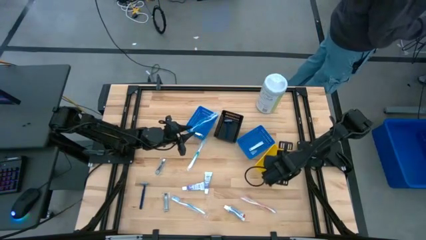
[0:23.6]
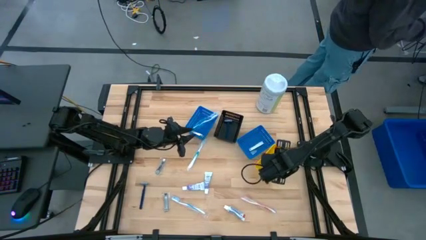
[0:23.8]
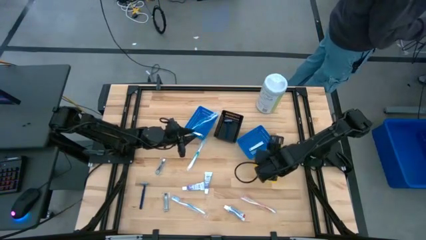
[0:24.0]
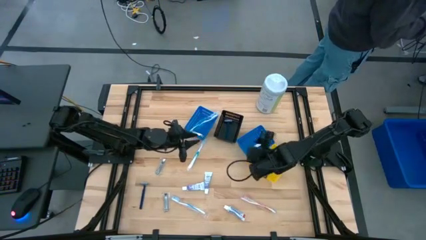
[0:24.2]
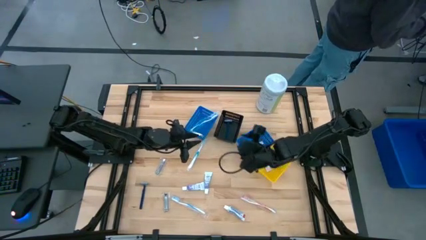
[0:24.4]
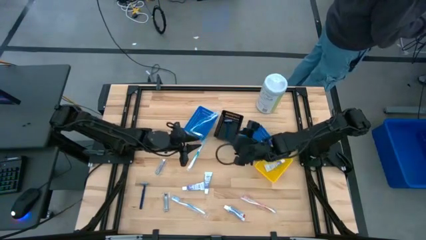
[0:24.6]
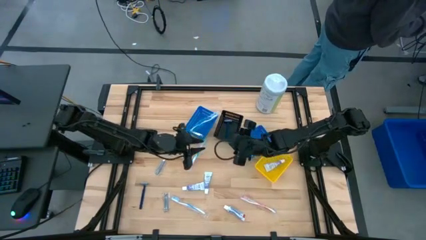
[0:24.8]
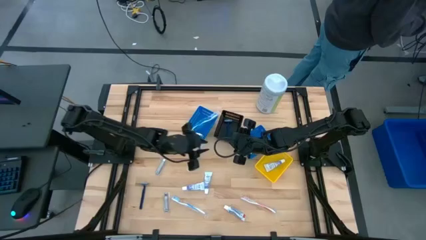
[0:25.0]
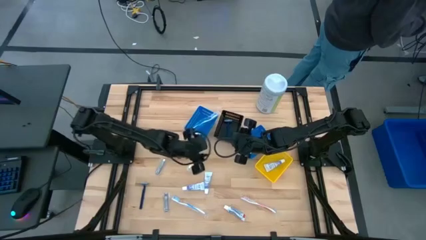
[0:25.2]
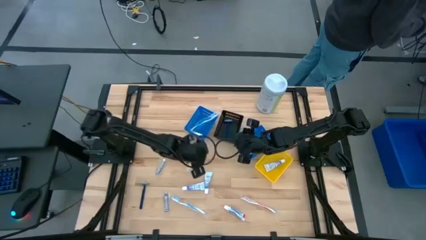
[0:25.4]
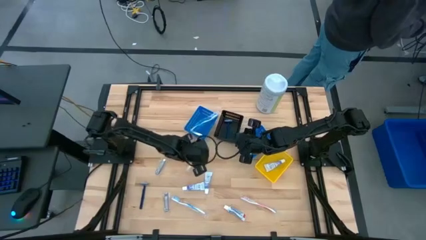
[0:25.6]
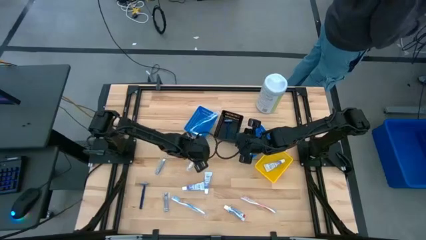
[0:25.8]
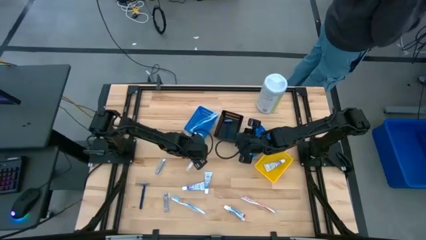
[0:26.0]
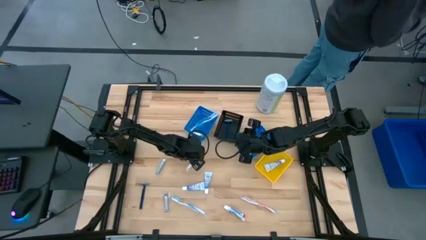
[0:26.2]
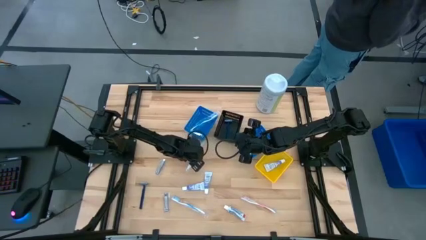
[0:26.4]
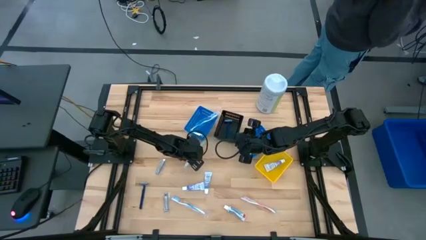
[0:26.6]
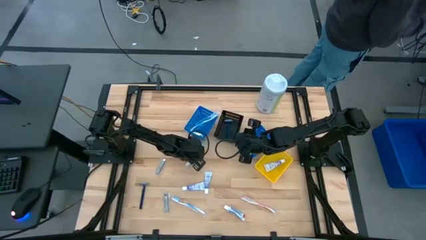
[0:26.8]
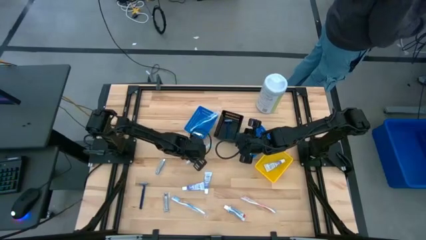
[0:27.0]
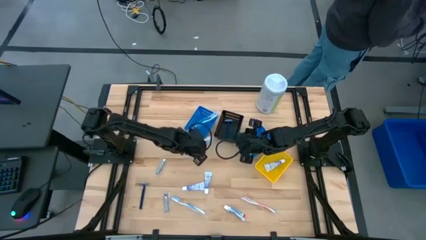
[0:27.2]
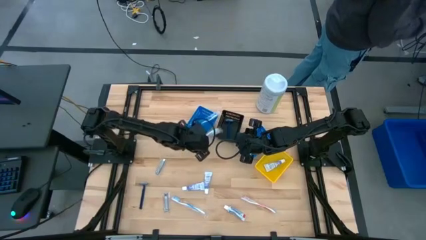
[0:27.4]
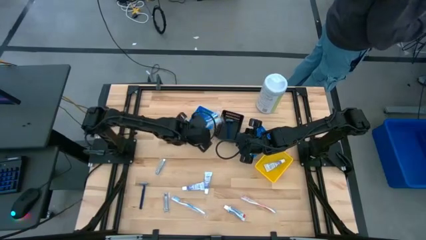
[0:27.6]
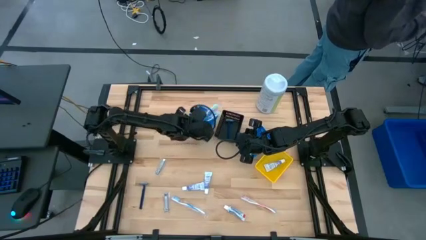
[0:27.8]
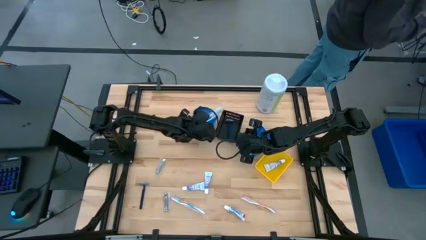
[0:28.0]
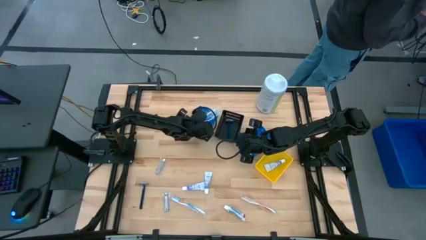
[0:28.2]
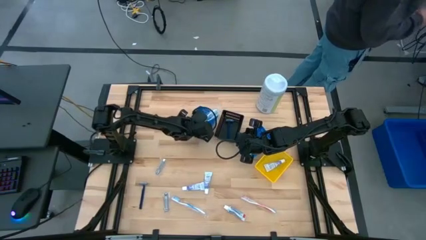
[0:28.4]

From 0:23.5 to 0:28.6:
Task: Pick & Place Travel size toiletries
Put the top blue toothbrush into the left blue basket

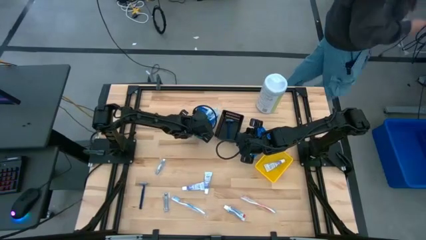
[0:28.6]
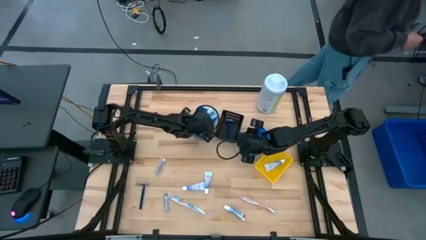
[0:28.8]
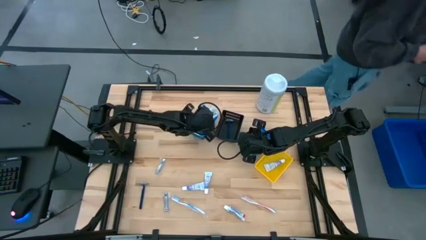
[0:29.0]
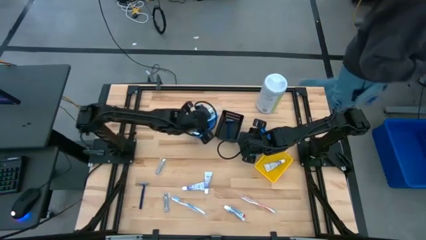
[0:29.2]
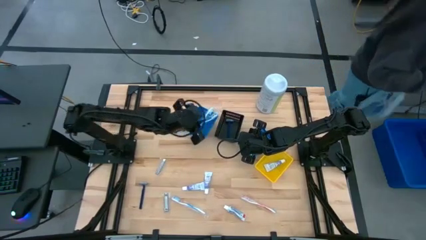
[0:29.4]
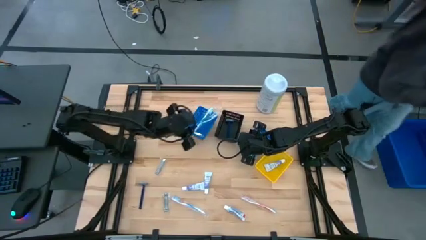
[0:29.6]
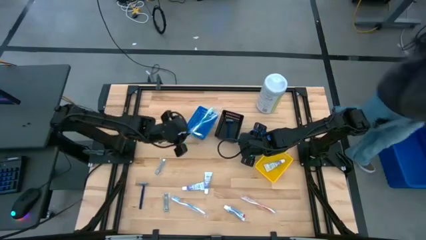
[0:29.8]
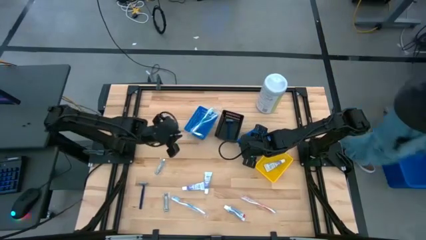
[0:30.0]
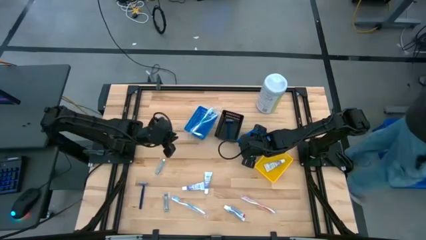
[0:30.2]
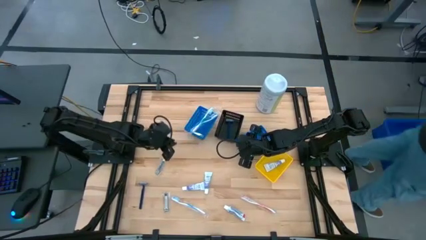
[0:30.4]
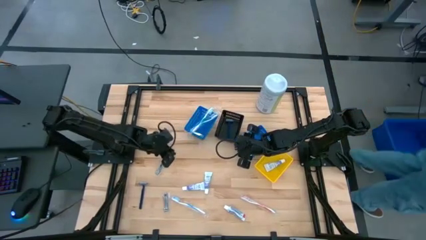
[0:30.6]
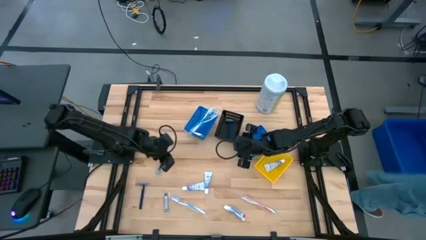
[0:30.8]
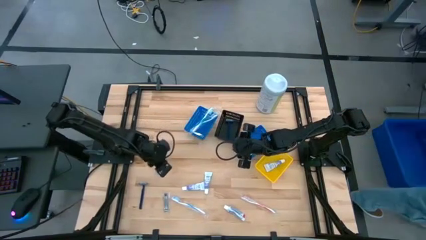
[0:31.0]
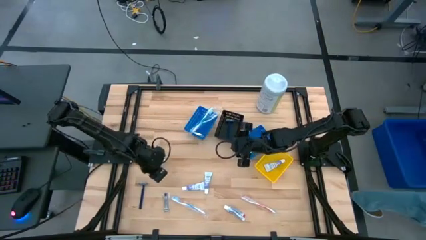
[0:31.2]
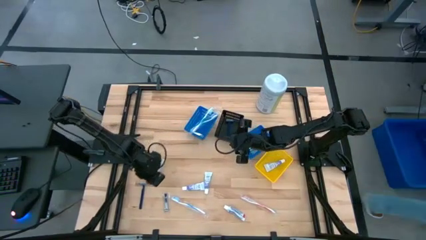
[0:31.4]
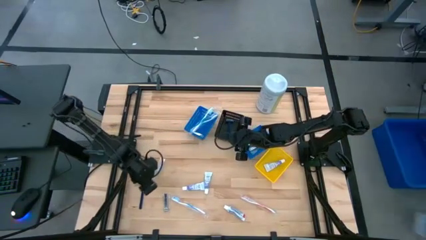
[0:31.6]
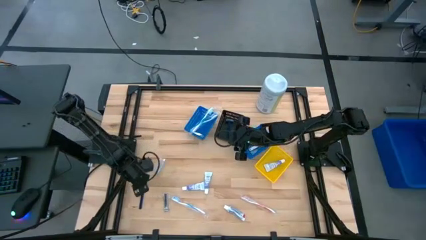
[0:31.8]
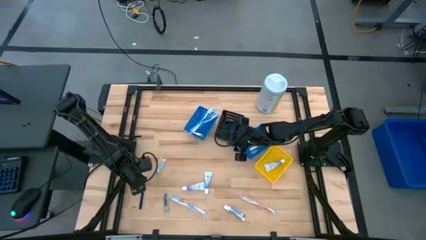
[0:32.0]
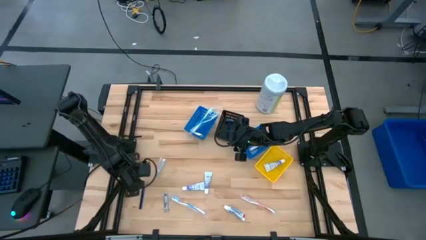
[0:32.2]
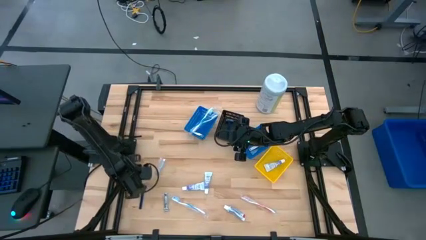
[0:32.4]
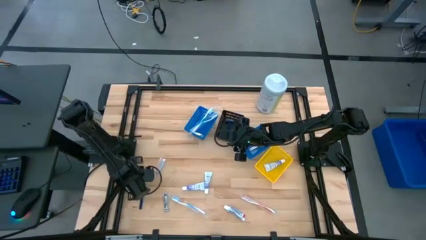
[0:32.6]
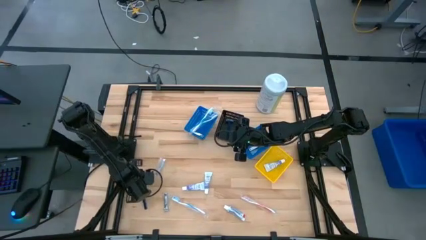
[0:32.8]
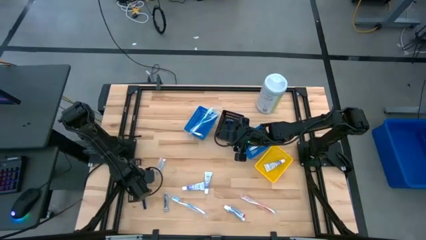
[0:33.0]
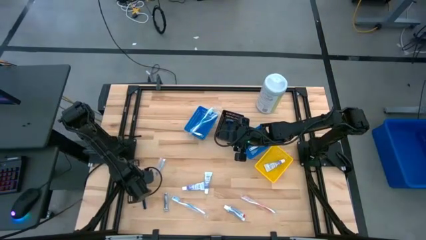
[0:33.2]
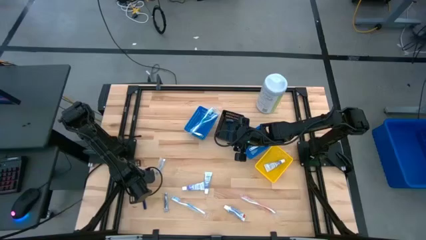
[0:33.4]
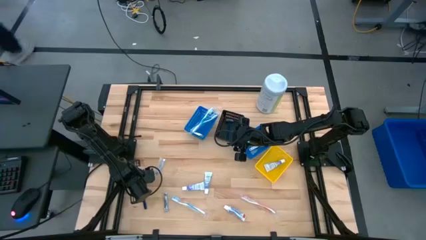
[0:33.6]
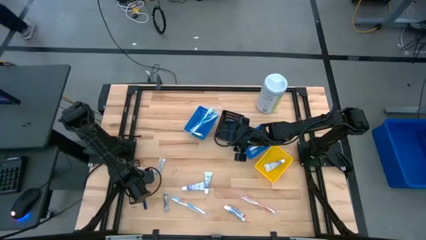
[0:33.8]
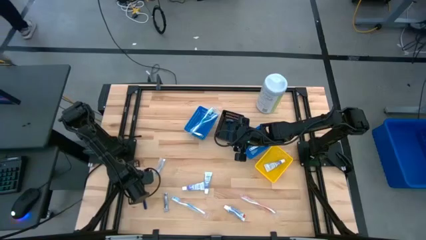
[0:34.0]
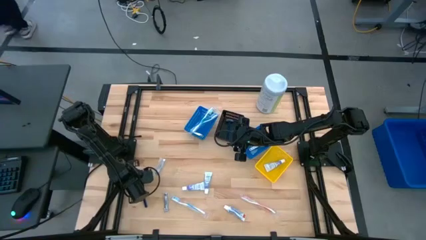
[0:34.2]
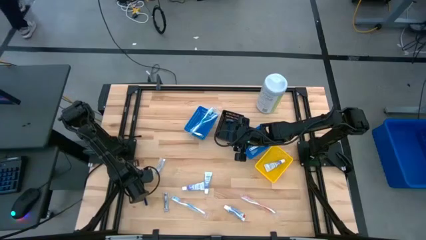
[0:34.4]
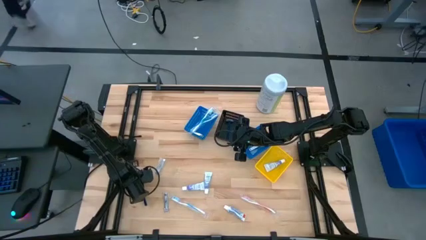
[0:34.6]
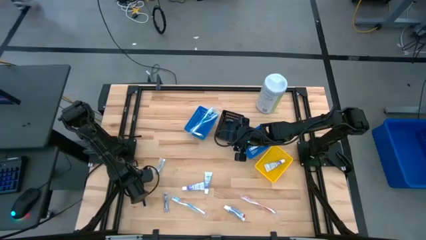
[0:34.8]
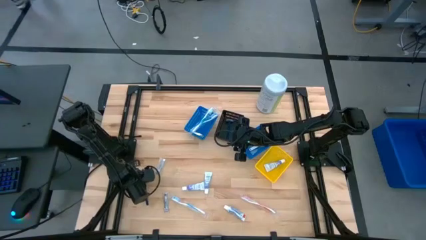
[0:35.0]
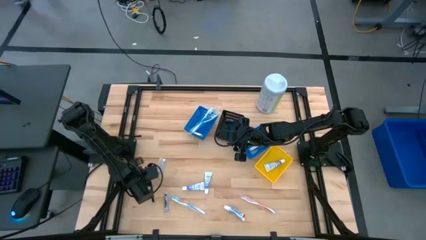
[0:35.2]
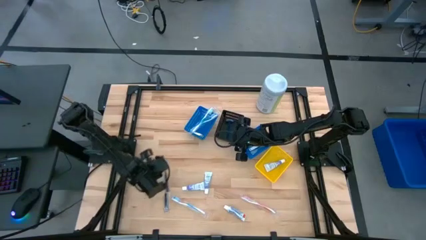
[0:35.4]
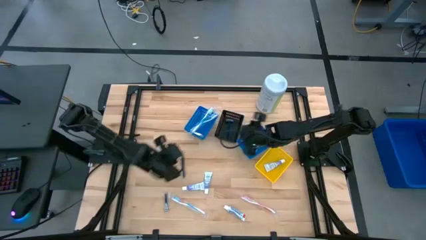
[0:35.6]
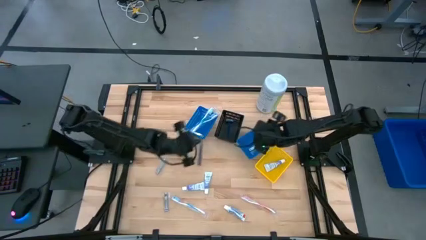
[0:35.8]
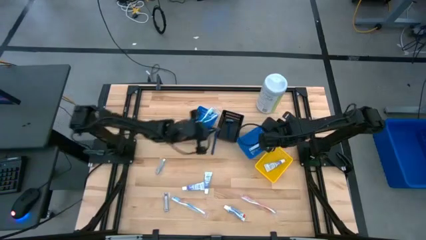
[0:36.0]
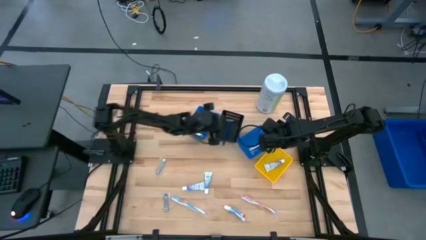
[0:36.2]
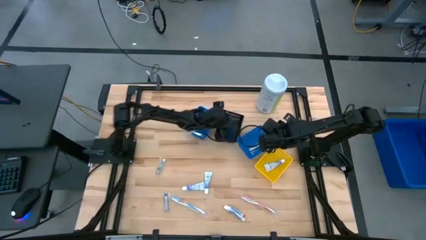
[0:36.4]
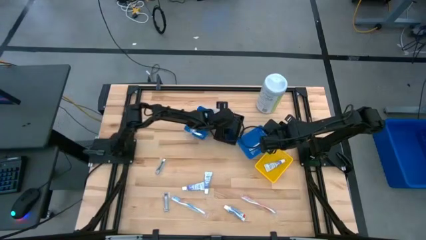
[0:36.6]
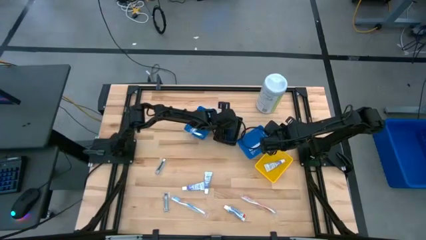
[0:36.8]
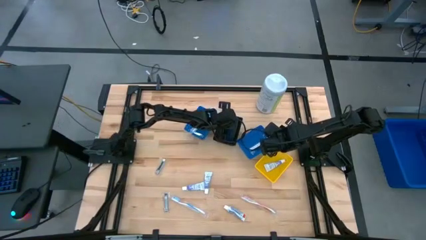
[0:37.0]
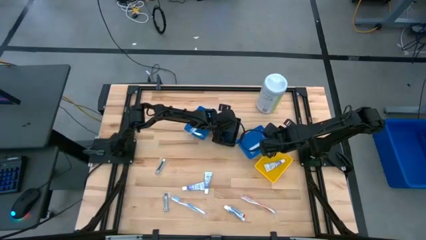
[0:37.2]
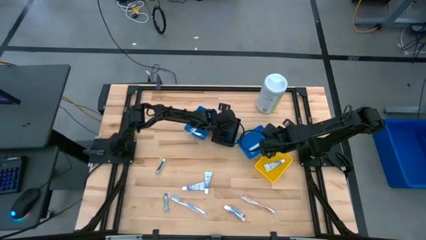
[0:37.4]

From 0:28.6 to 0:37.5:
Put the blue razor into the black basket

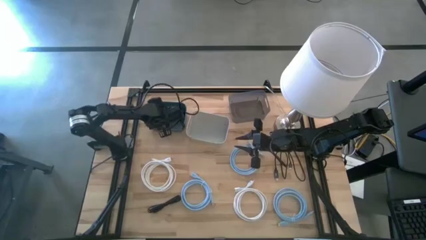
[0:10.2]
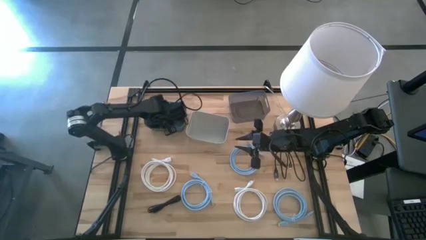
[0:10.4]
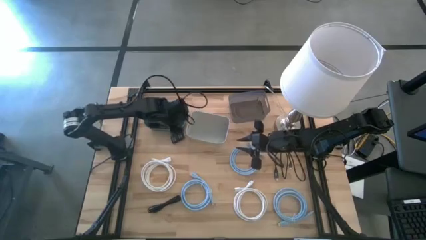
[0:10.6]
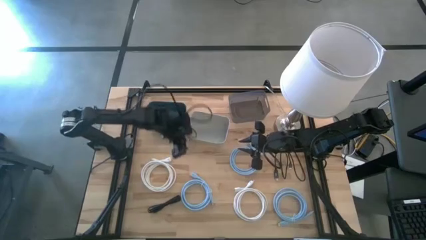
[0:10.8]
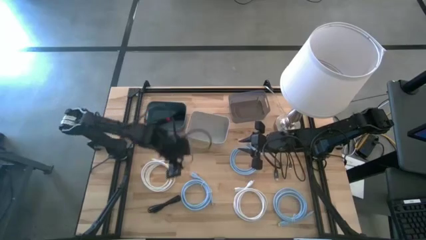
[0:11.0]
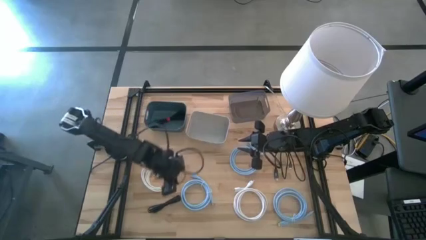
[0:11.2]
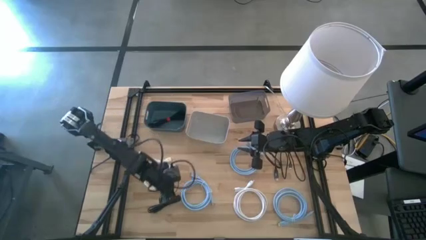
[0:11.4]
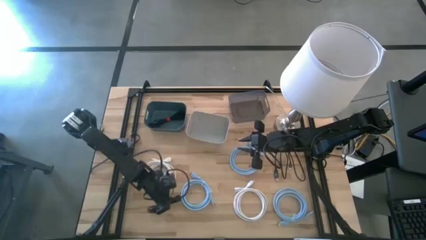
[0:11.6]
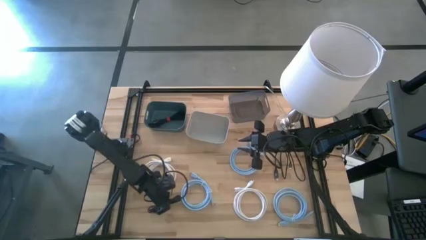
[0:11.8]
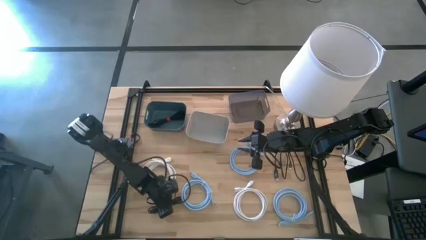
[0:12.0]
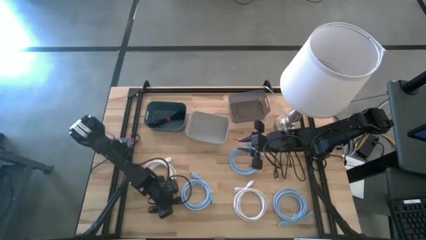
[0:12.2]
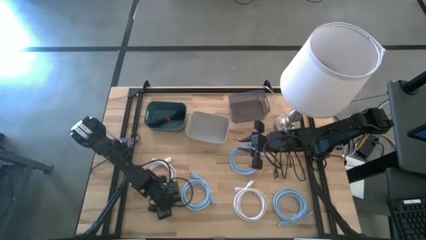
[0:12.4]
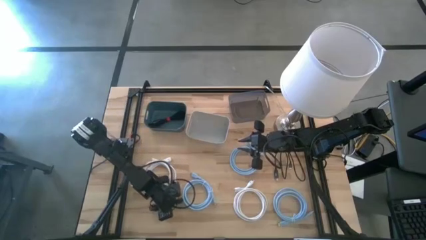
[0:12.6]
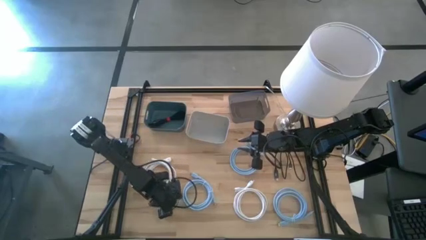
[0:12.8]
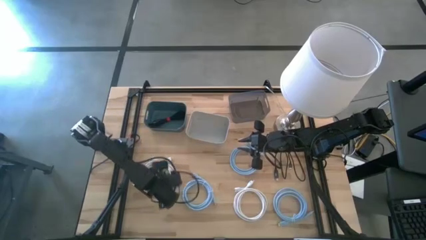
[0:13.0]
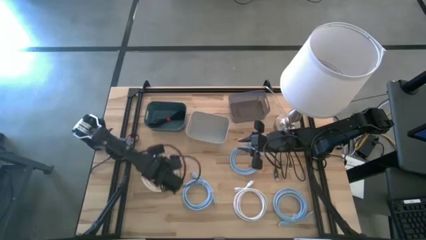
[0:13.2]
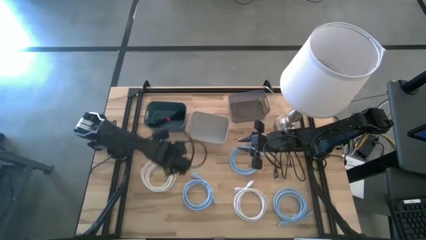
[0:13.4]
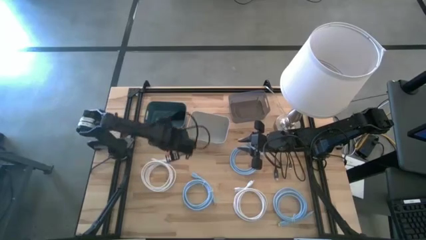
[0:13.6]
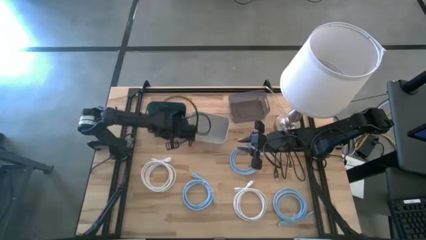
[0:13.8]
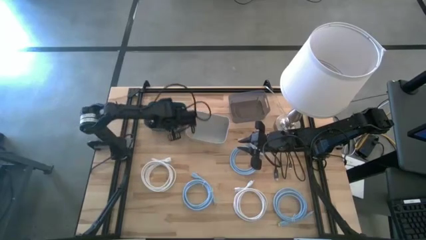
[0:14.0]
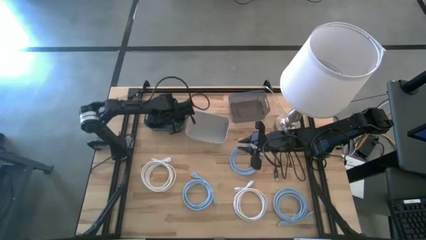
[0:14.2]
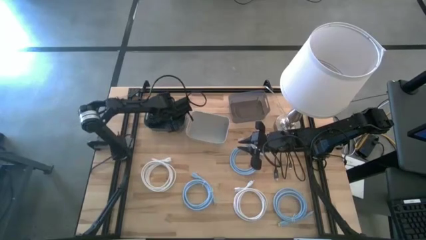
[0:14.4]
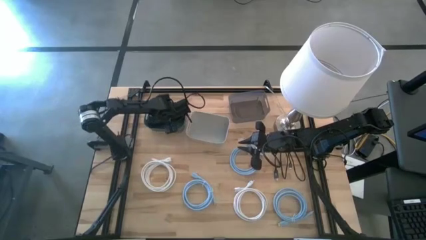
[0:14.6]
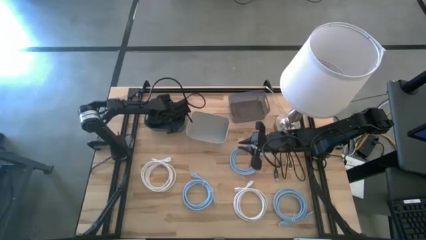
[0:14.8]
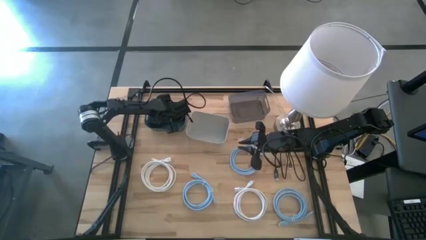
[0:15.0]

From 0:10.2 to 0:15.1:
Task: Pick & Place USB Port
Put the bottom black charger cable into the gray bin
